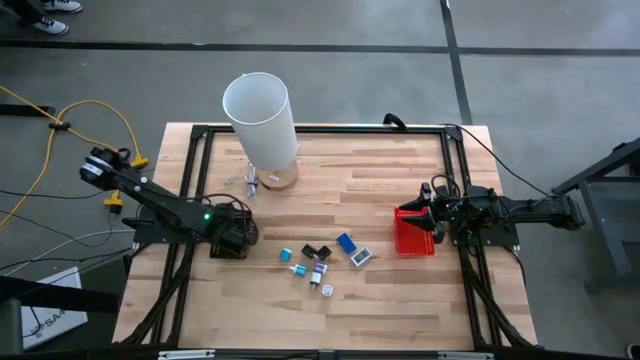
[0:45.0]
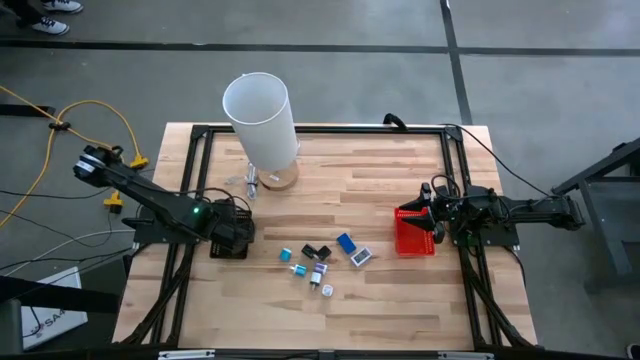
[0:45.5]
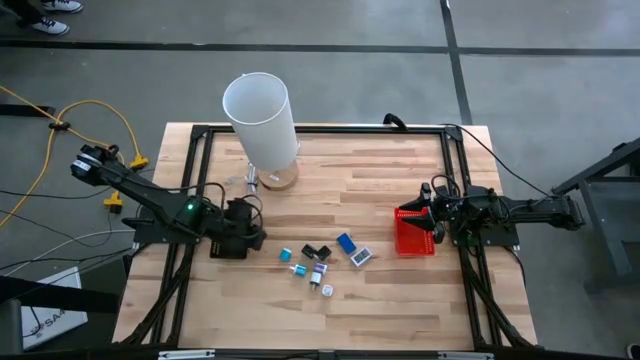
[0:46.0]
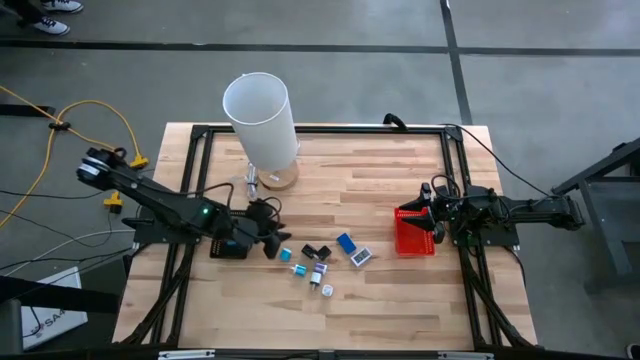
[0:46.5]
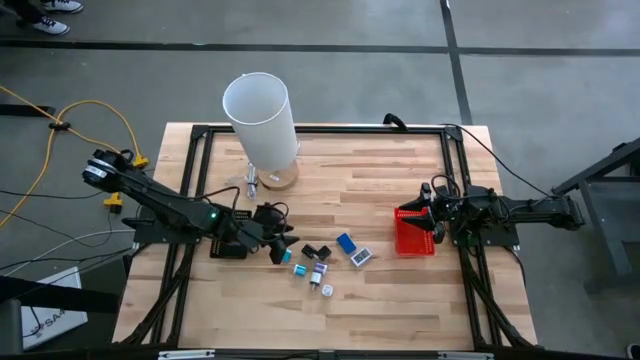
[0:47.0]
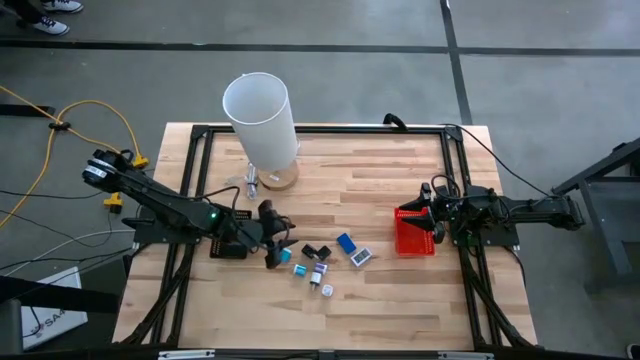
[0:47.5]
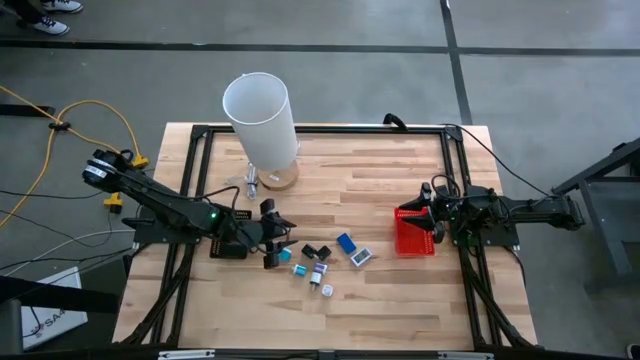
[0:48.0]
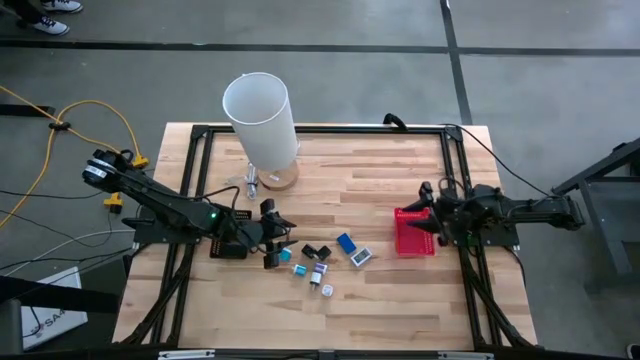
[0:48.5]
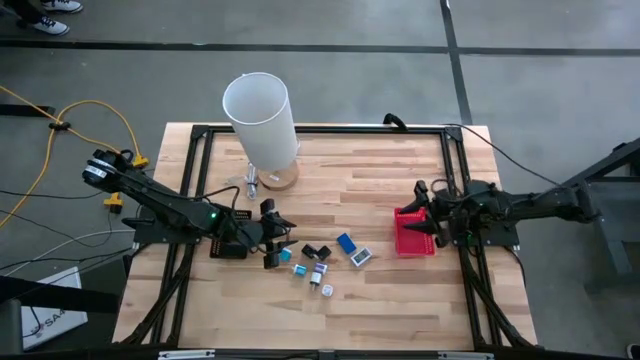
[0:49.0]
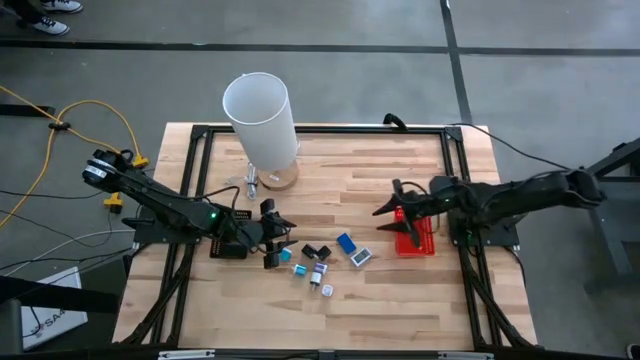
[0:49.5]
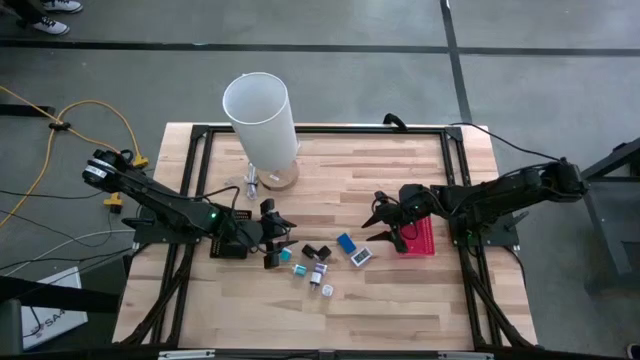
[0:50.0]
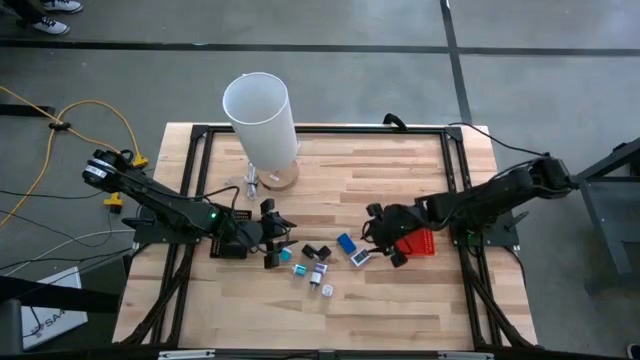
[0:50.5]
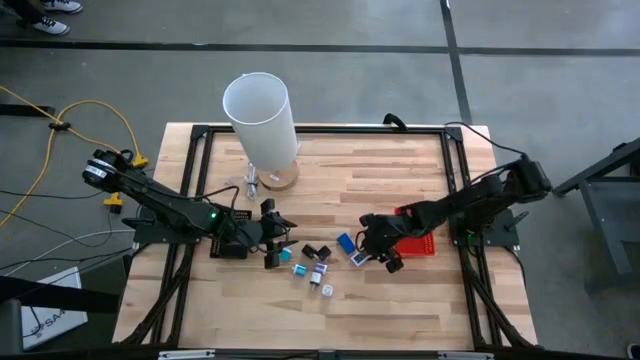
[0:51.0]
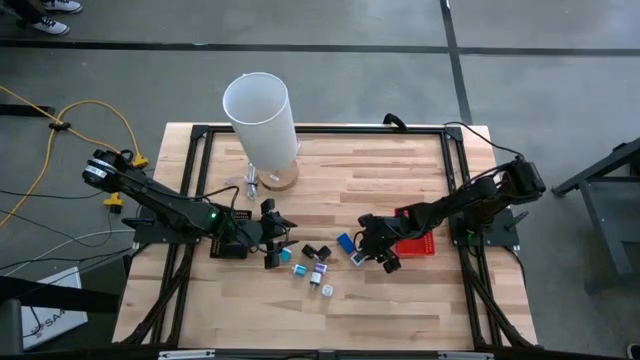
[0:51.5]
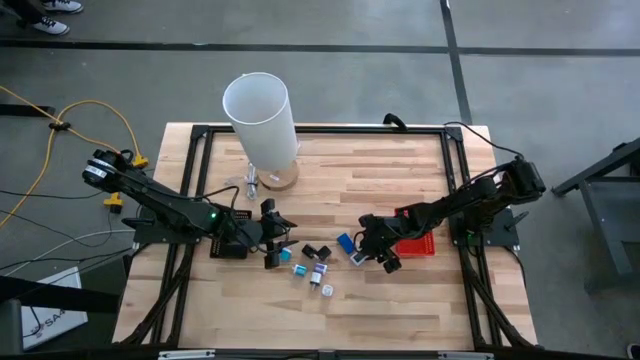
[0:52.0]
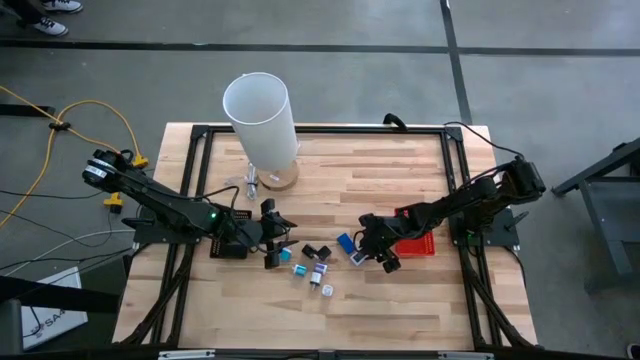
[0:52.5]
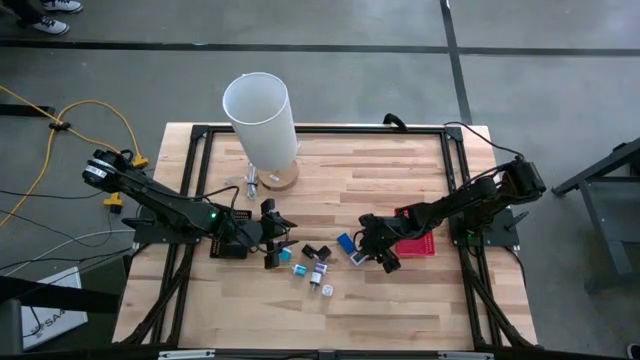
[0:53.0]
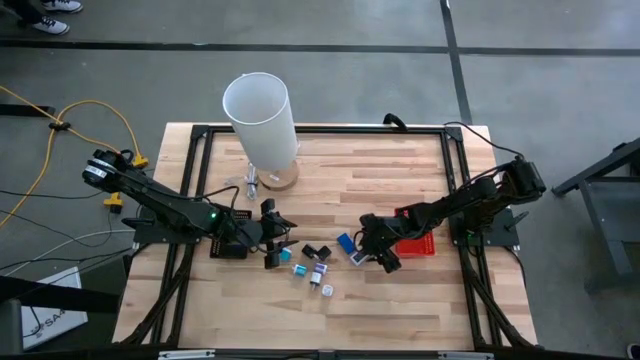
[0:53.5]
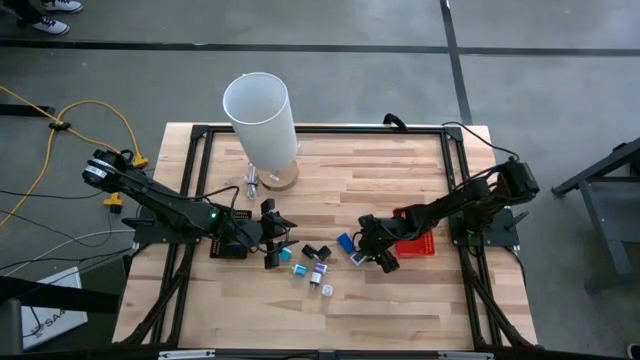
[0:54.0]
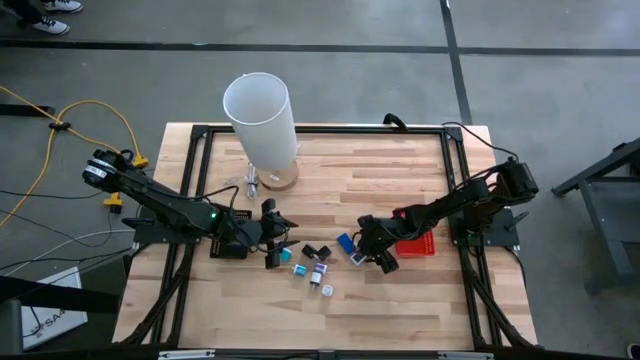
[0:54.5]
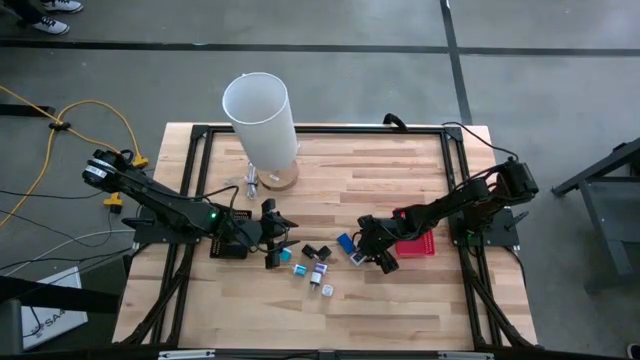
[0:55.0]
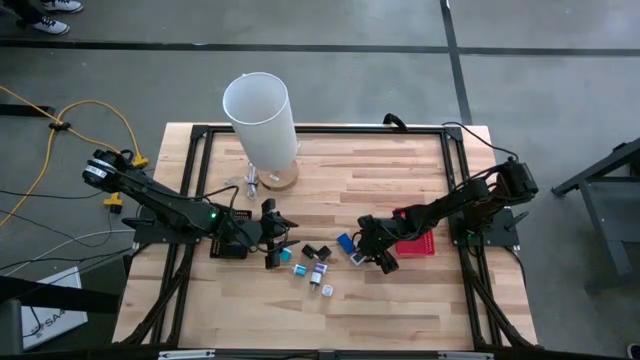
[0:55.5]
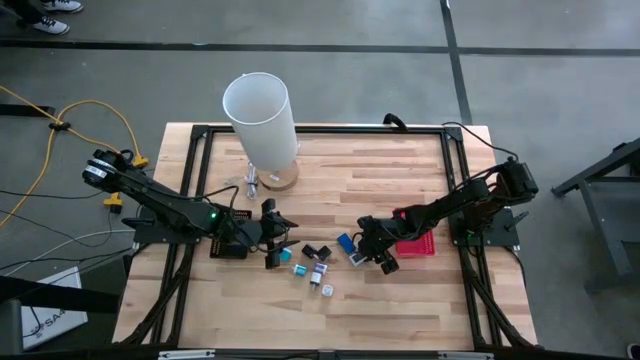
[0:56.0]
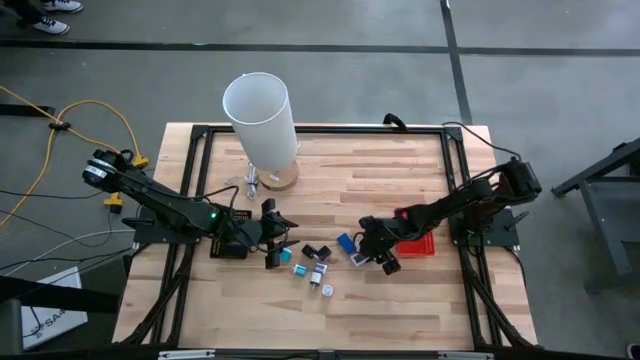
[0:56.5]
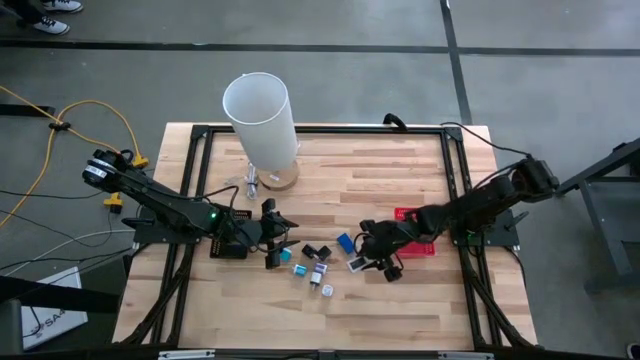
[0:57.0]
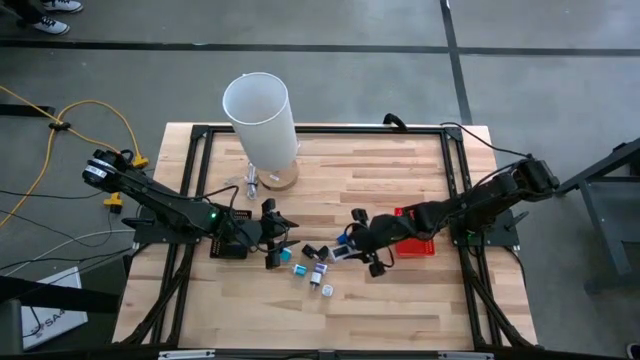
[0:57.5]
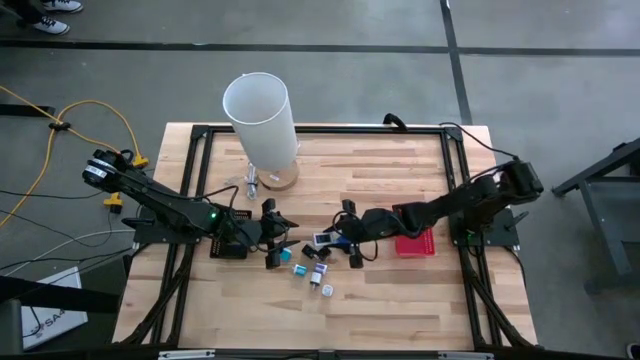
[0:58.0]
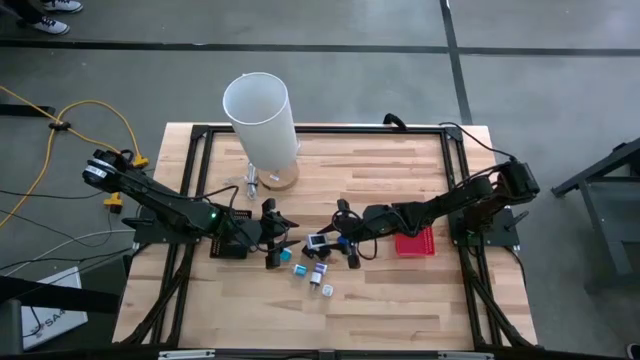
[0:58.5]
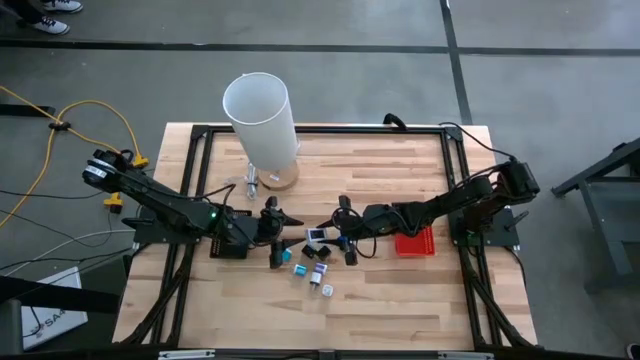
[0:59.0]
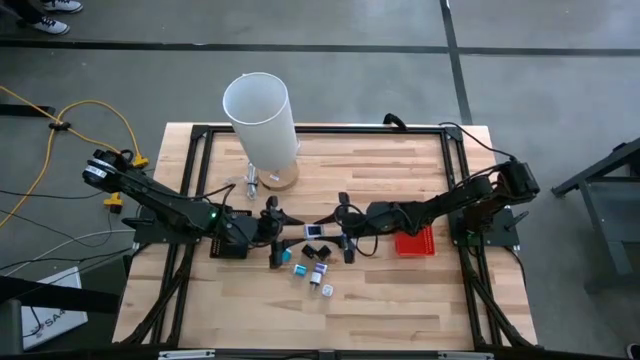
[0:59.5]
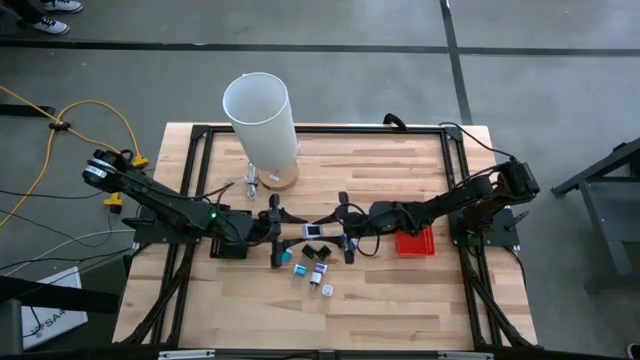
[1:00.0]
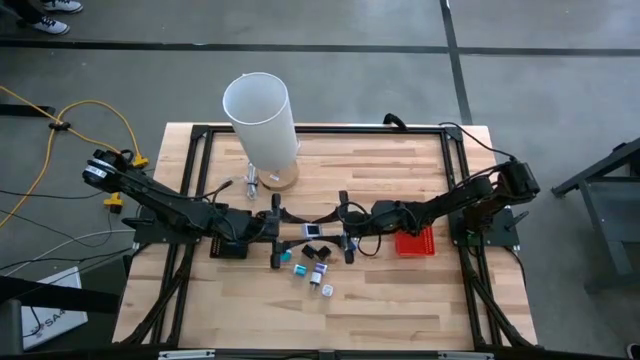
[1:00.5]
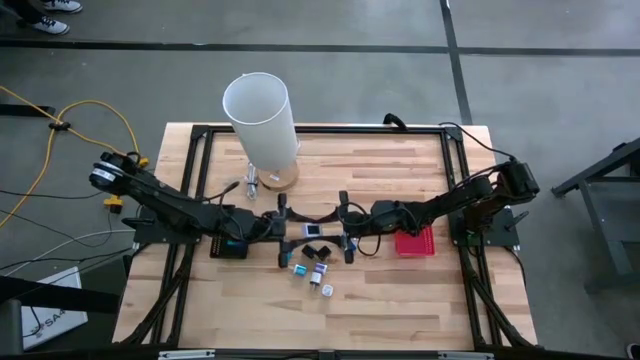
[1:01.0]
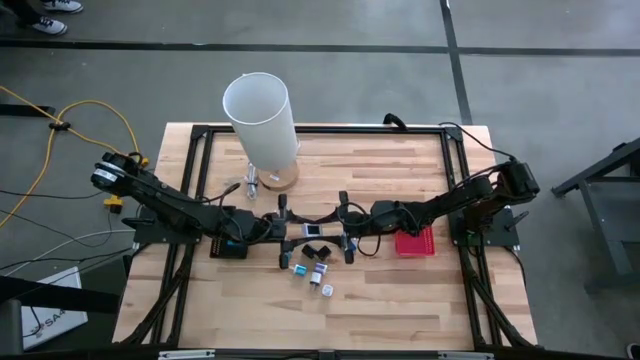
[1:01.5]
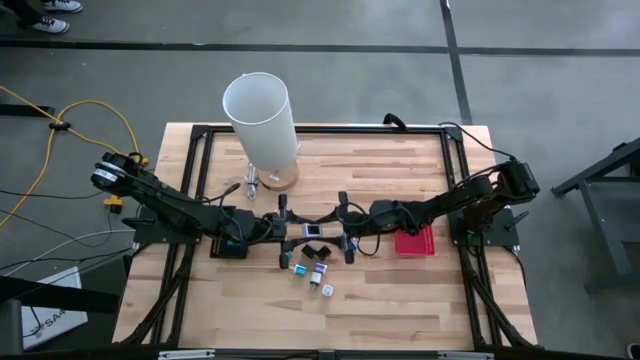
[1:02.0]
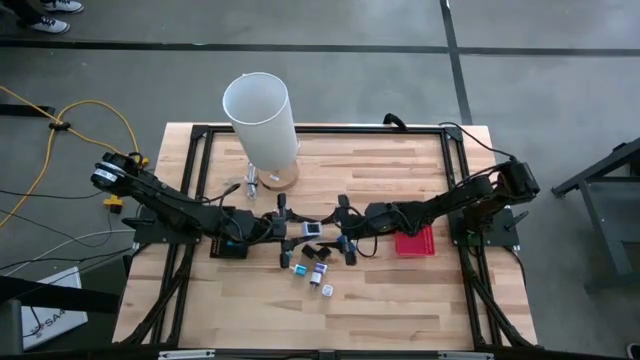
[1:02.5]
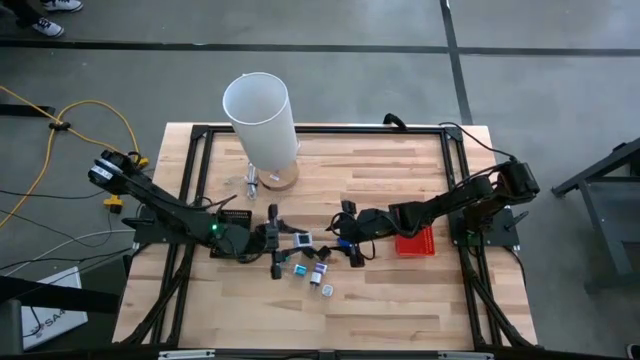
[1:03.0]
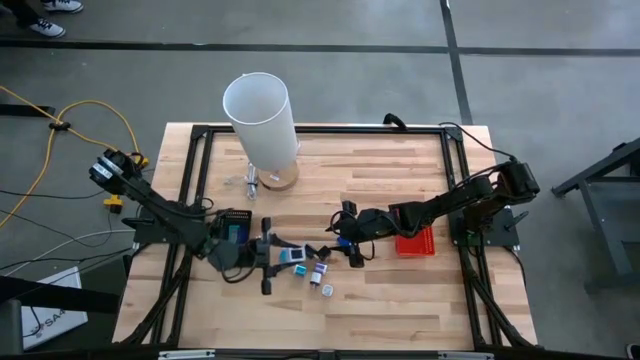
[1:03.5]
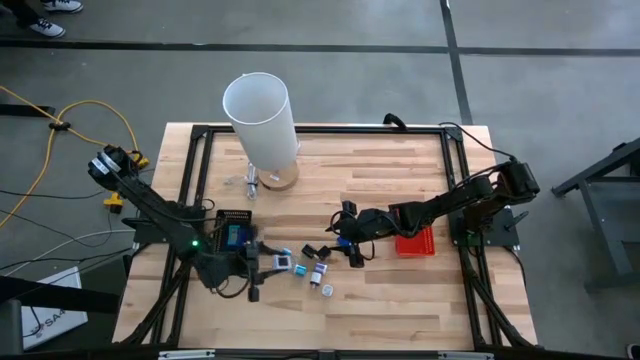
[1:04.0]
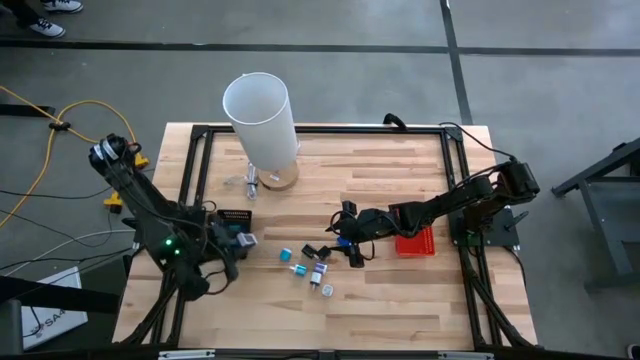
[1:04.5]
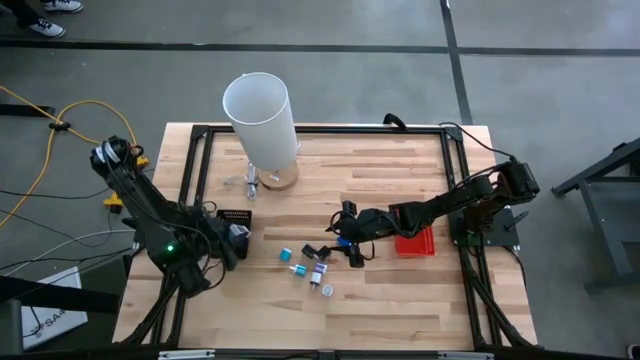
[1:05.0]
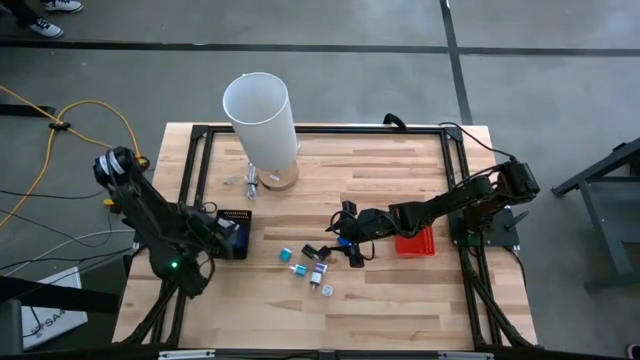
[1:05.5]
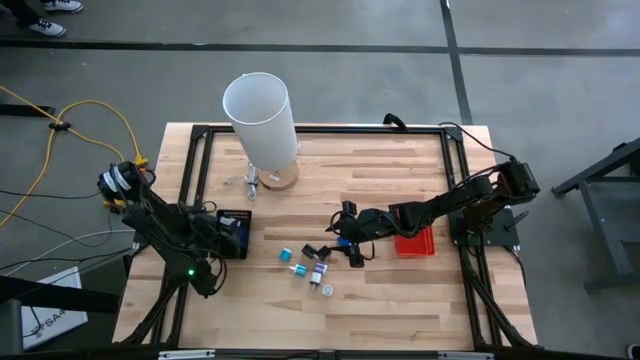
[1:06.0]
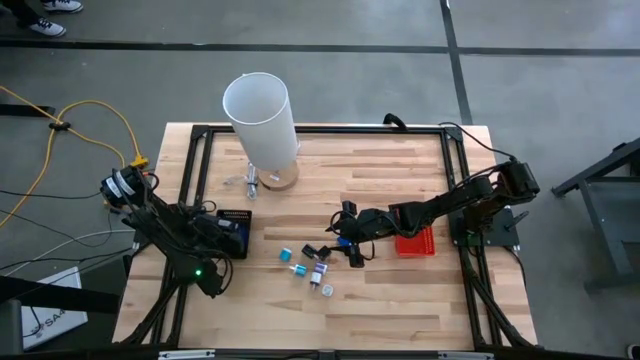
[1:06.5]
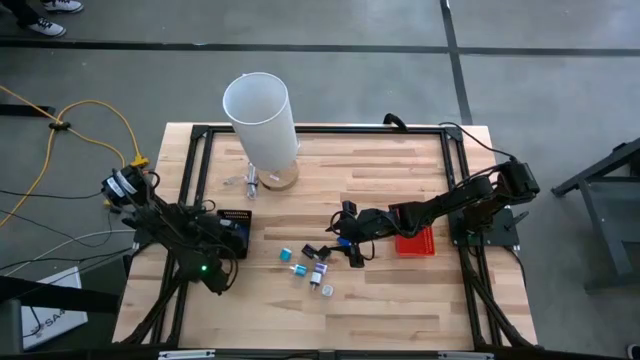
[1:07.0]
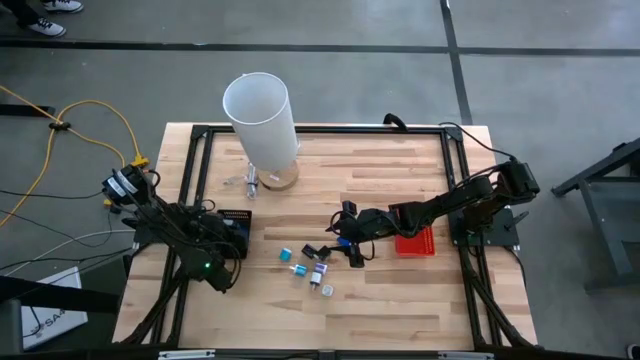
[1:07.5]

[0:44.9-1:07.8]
Task: Pick & Place Office items
Put the white digital timer into the black bin
